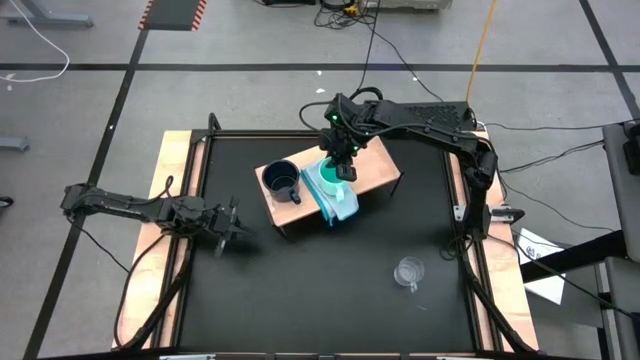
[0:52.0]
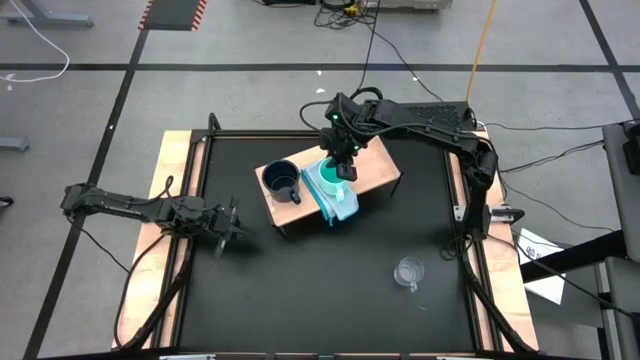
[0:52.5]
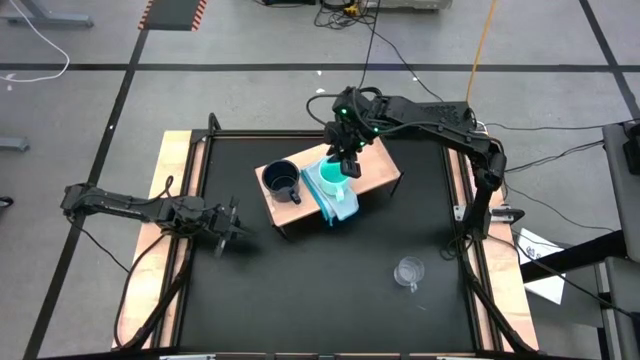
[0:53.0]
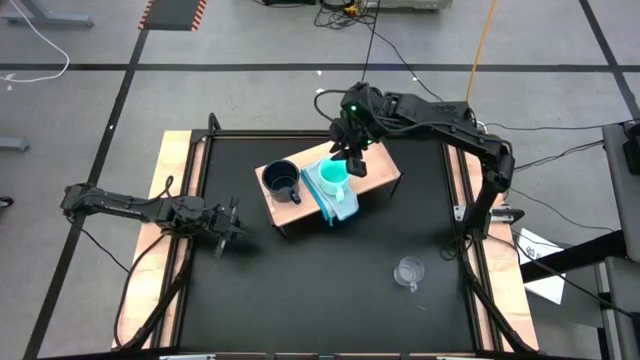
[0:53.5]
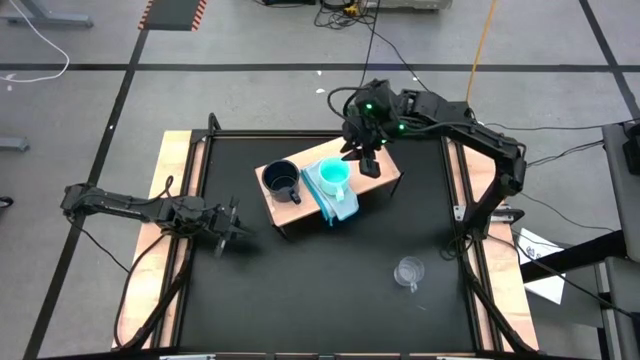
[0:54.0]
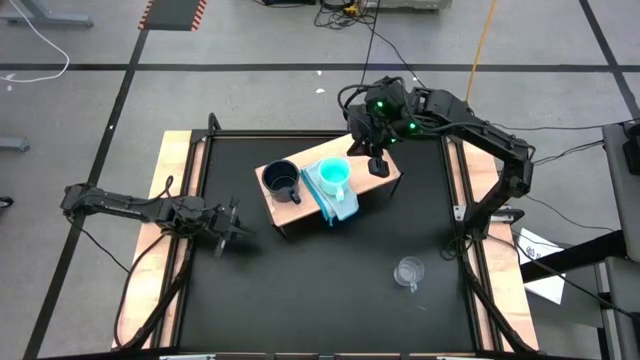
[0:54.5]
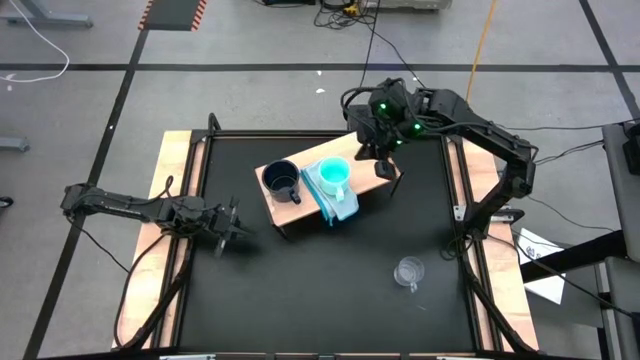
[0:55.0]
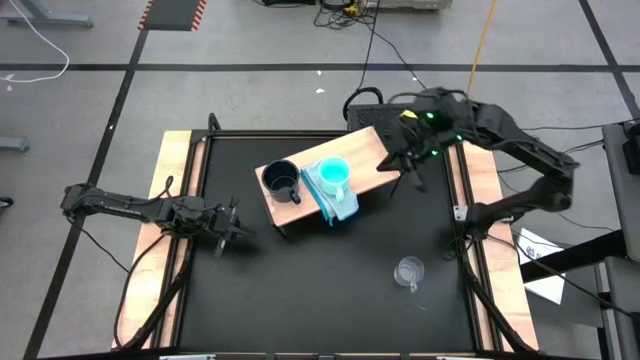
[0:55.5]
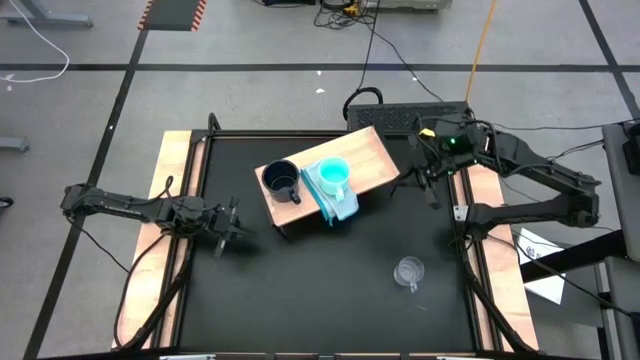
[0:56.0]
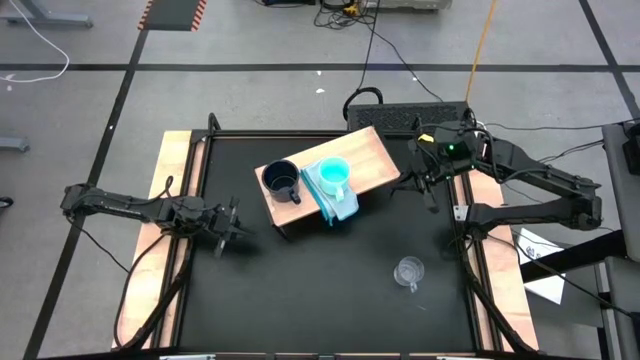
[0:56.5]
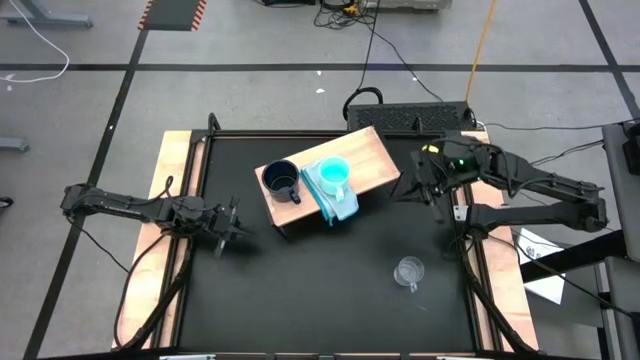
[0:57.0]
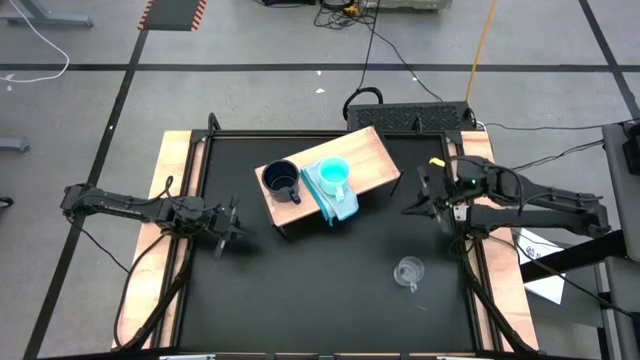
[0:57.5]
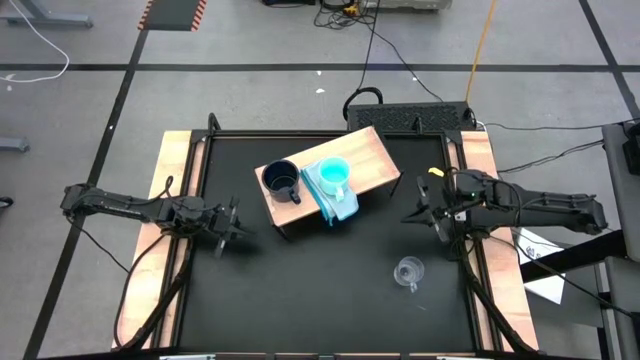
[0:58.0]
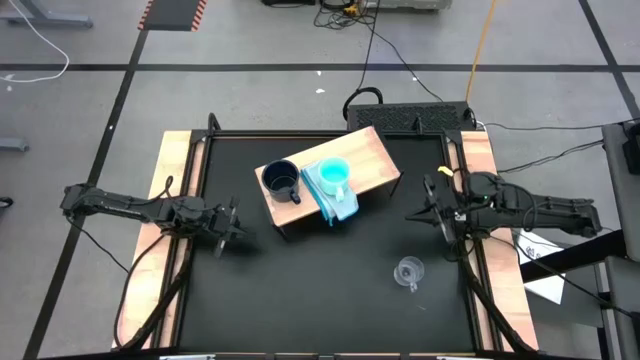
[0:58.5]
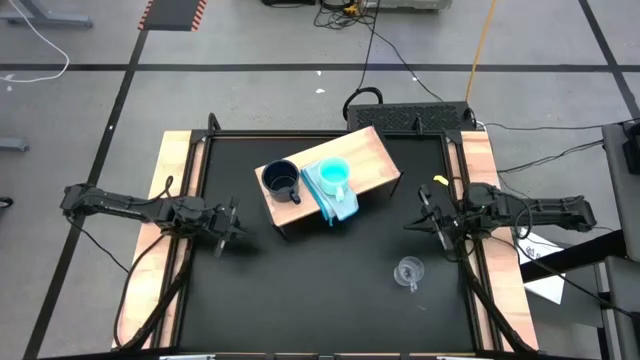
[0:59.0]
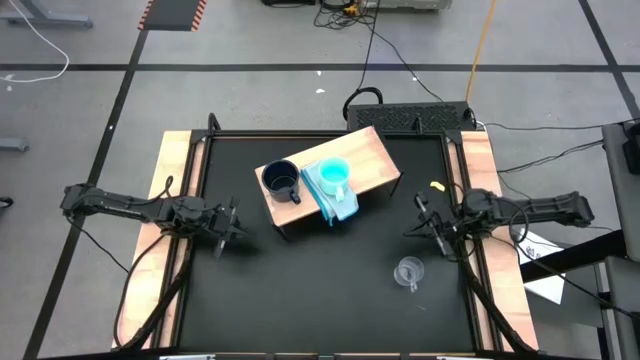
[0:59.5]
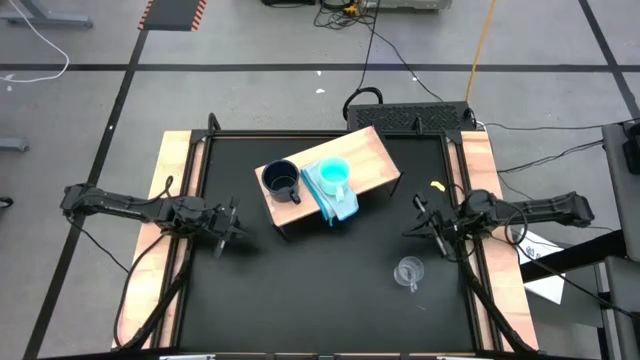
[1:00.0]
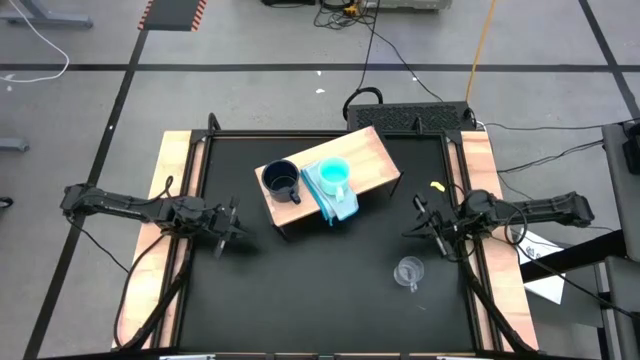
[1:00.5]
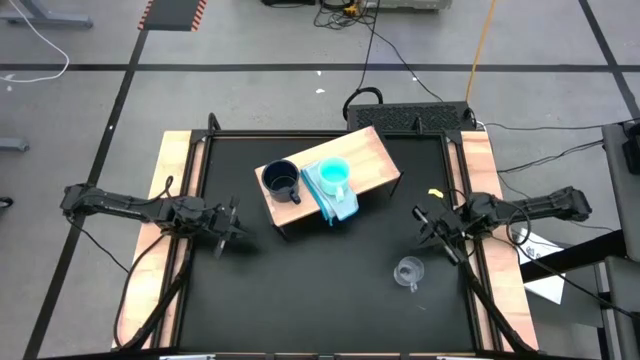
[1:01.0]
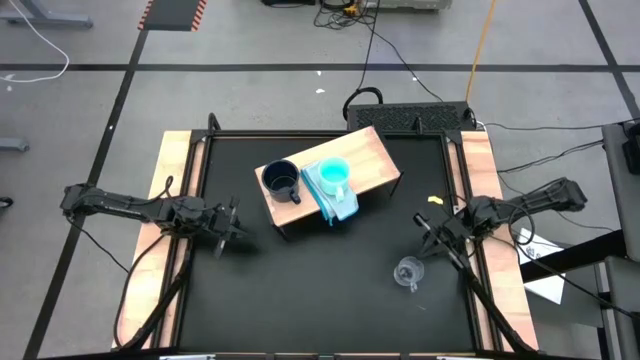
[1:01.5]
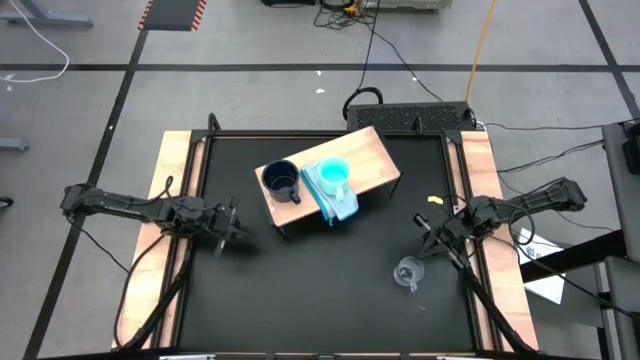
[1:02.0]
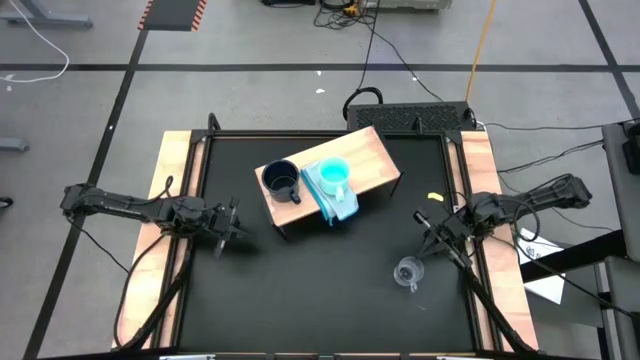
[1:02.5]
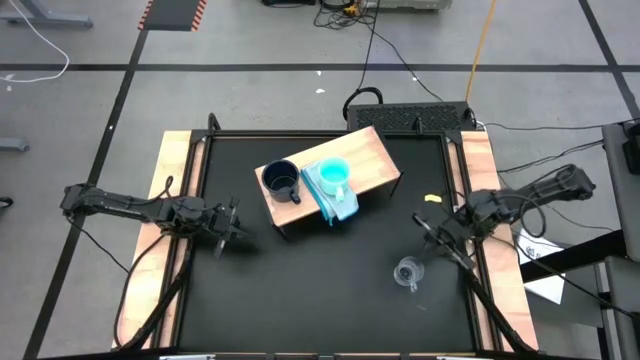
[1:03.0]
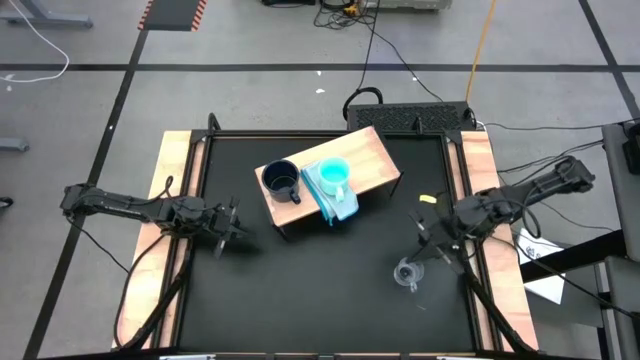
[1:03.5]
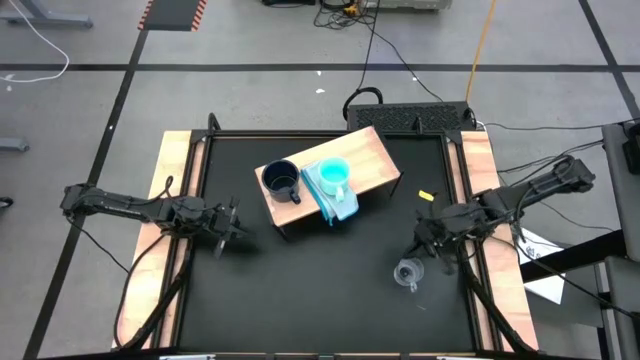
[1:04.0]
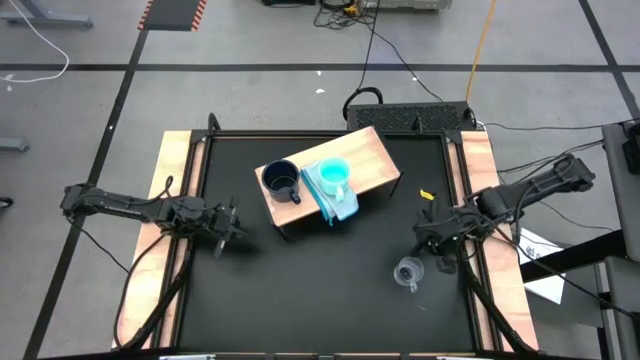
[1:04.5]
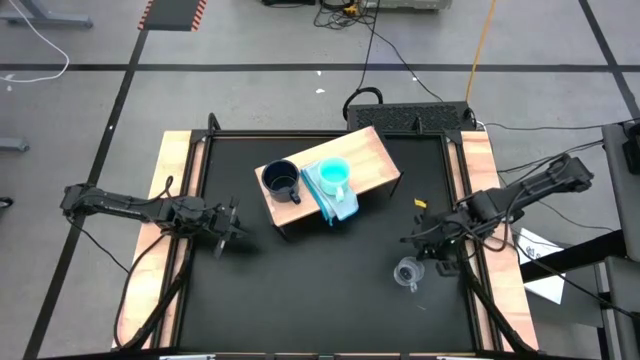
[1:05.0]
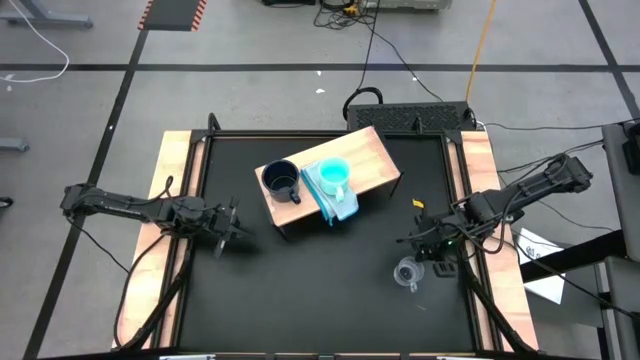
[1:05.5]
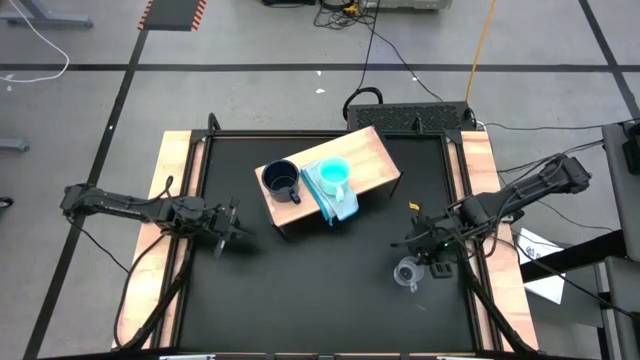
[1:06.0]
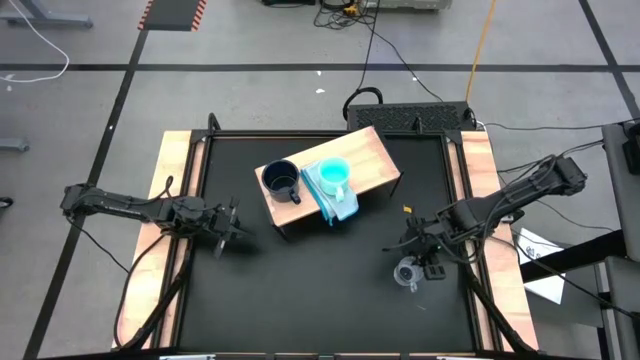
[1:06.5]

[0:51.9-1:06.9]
Task: Stack small to large cups/mugs on shelf
Put the transparent mug to the right on the shelf

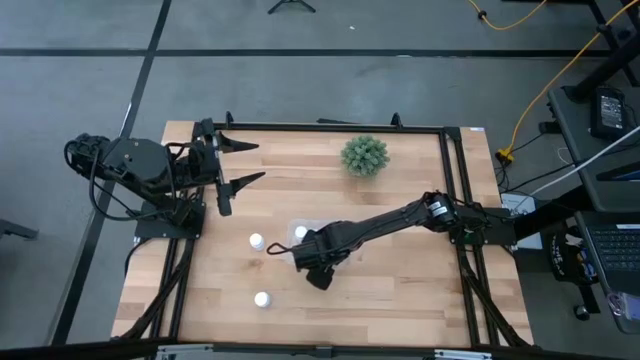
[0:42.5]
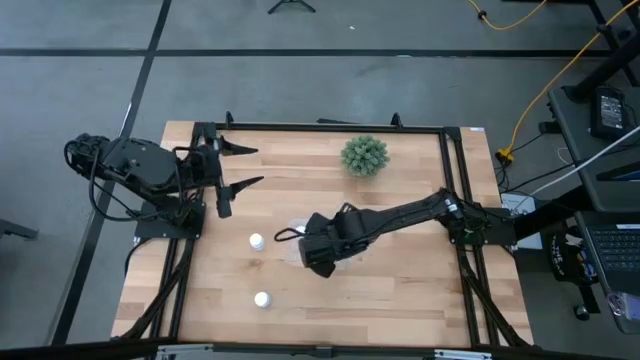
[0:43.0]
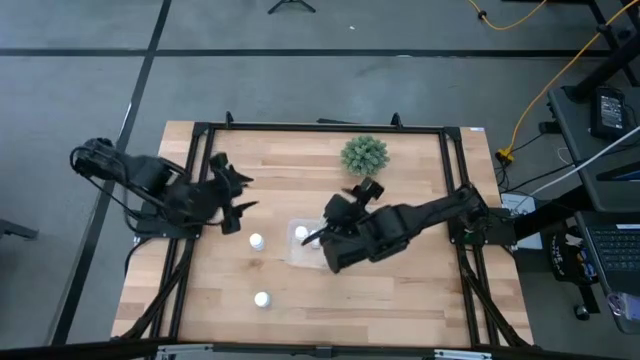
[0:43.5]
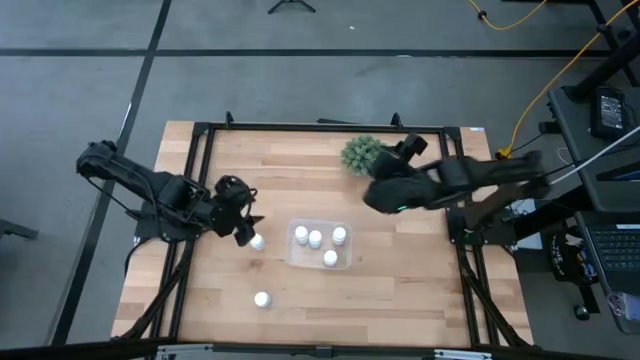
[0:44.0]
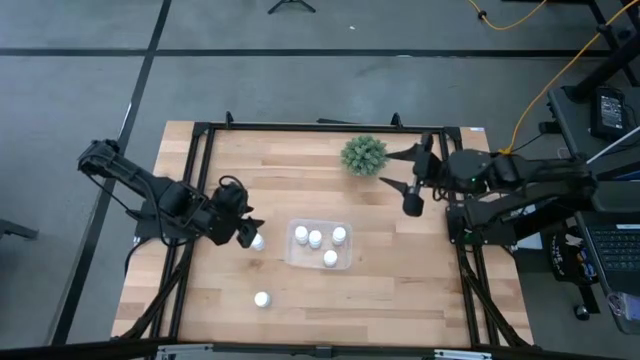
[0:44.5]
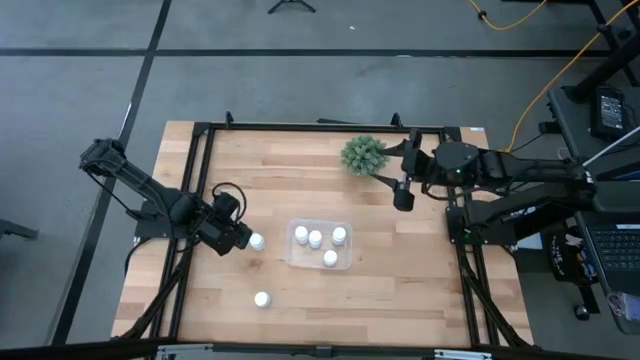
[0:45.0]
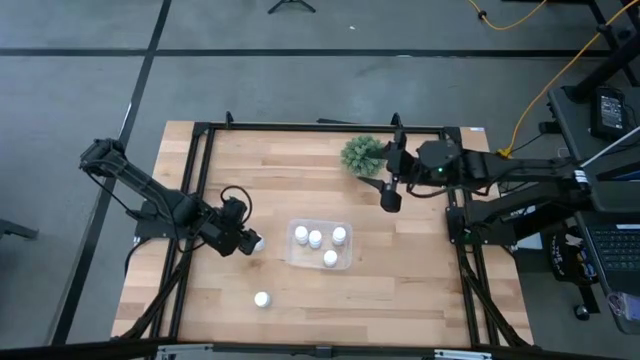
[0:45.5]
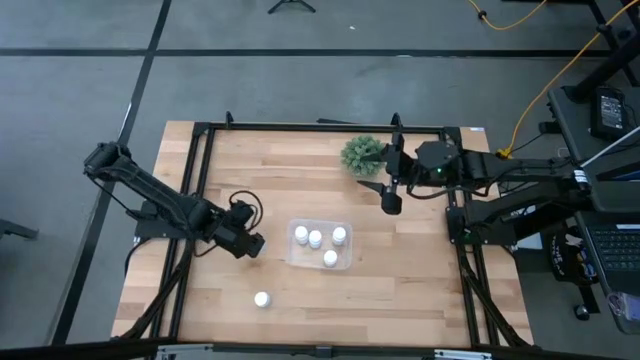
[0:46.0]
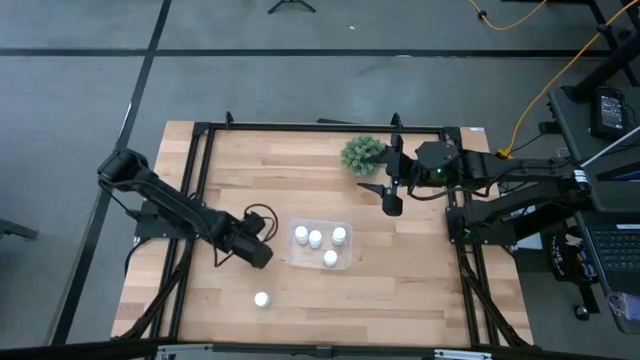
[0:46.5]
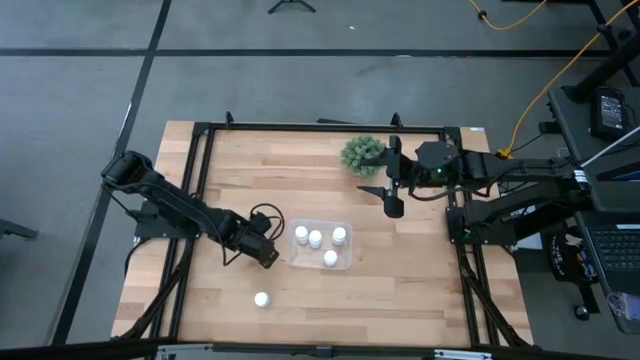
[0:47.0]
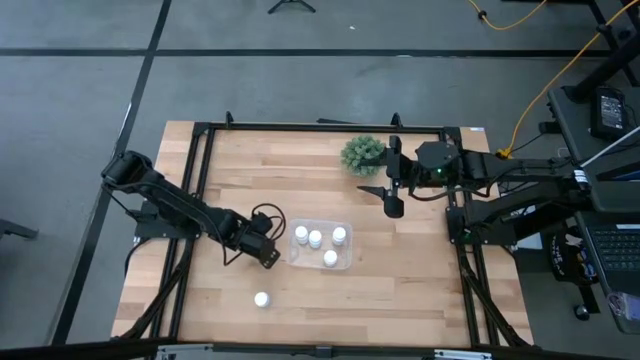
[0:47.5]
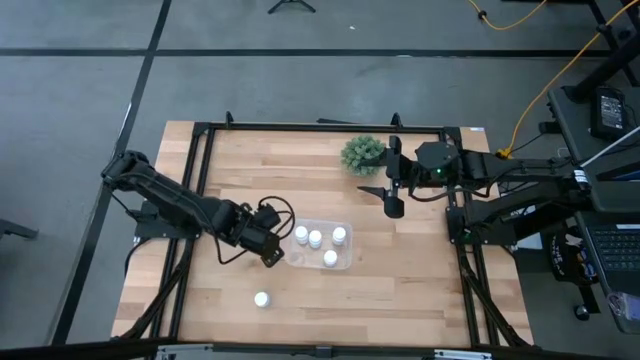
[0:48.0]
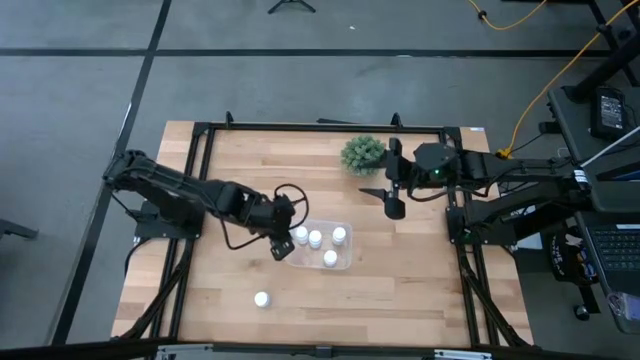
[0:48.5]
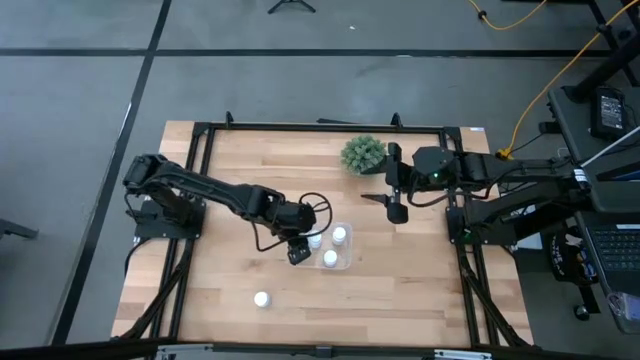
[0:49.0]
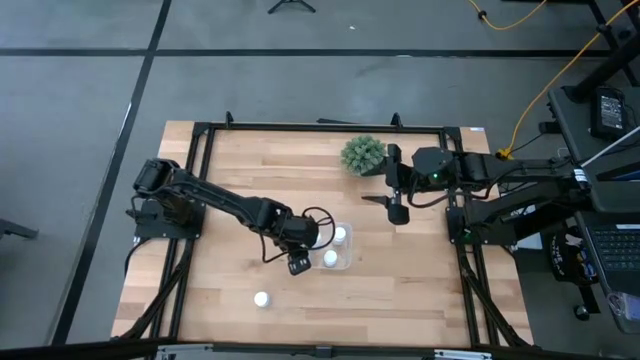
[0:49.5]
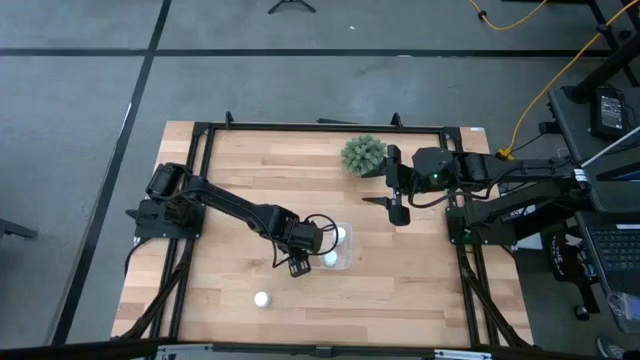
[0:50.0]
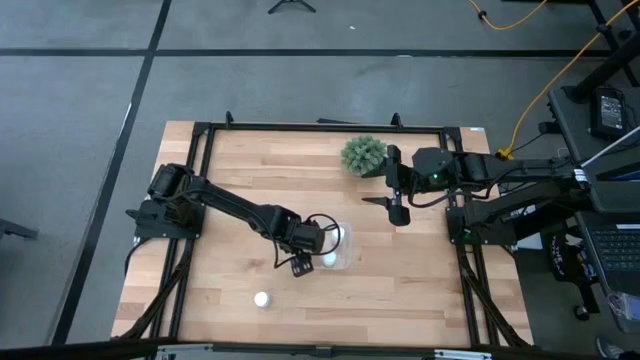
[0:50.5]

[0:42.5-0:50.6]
Task: Pick and place pill bottles into a basket
Put the white medicine bottle into the transparent bin
